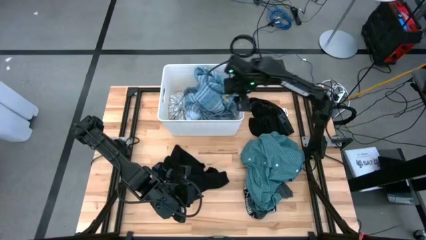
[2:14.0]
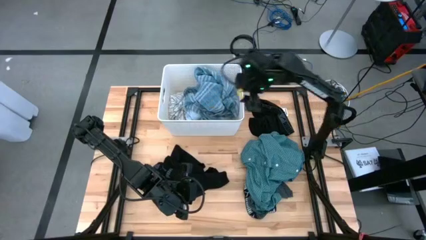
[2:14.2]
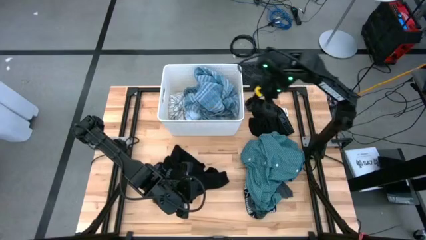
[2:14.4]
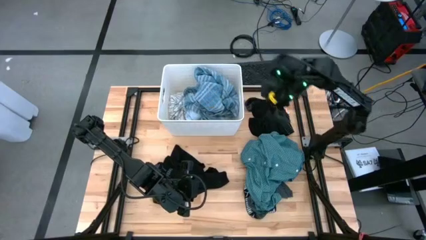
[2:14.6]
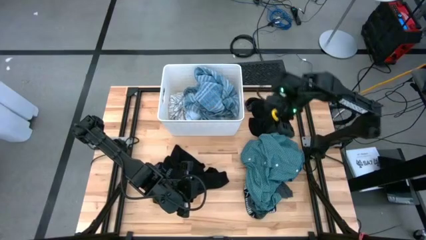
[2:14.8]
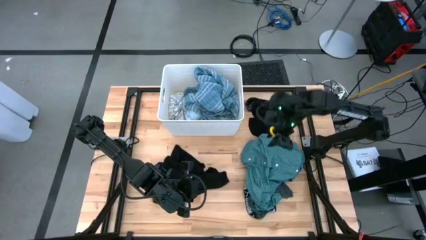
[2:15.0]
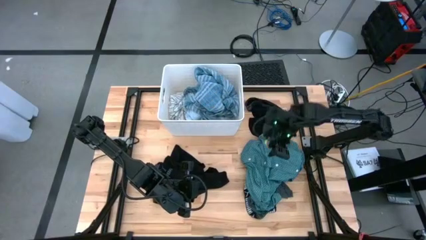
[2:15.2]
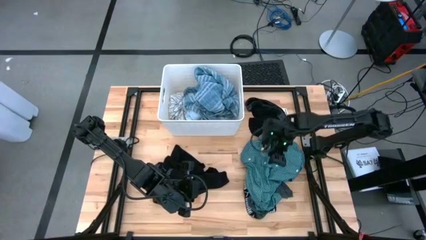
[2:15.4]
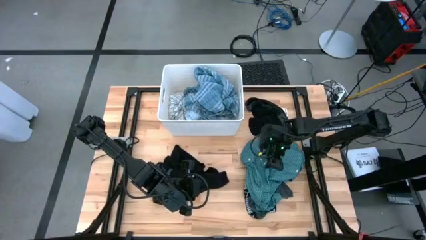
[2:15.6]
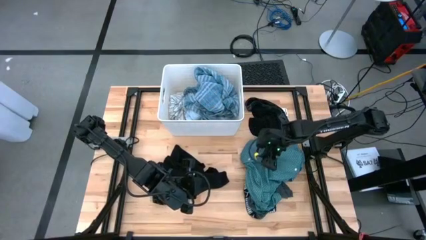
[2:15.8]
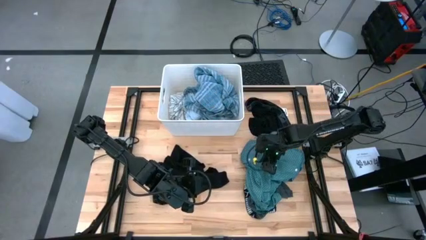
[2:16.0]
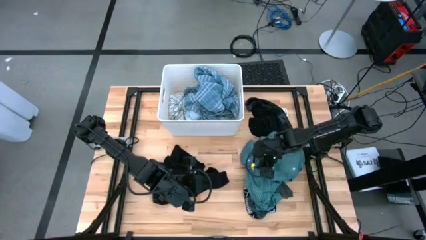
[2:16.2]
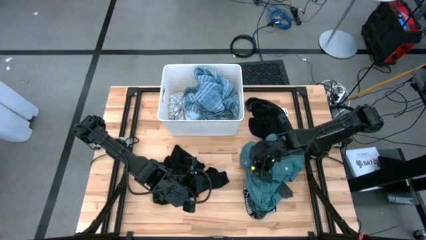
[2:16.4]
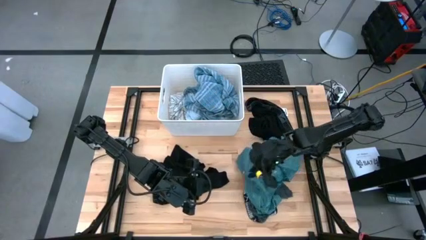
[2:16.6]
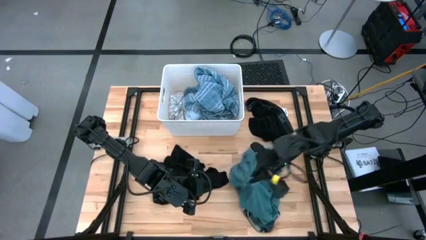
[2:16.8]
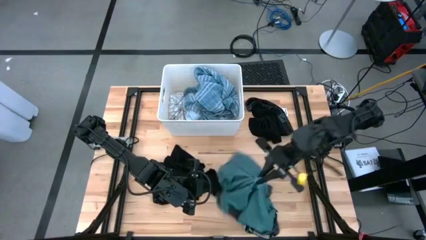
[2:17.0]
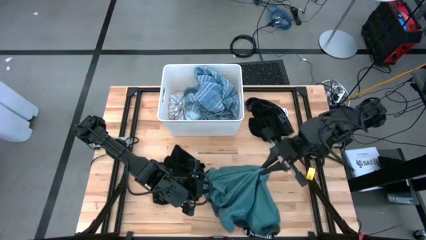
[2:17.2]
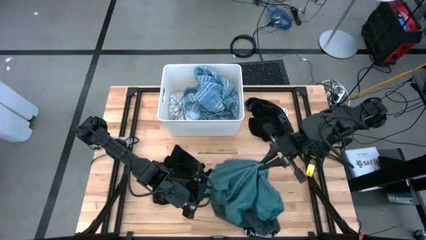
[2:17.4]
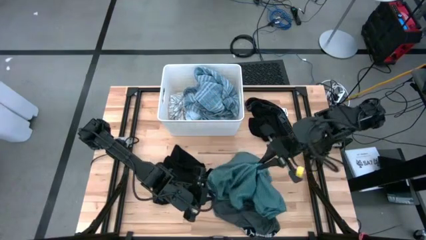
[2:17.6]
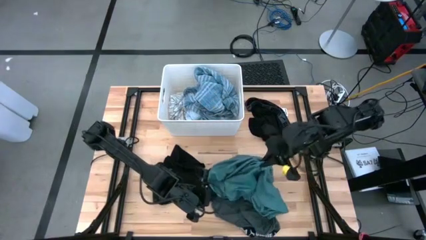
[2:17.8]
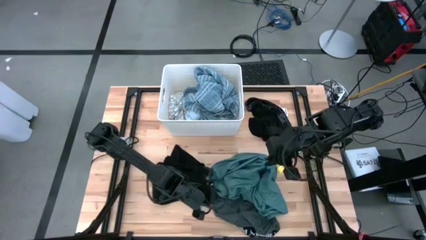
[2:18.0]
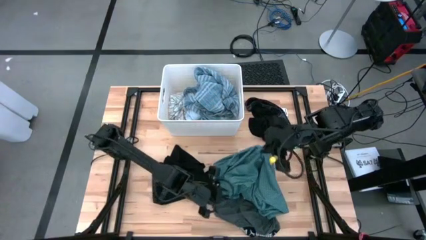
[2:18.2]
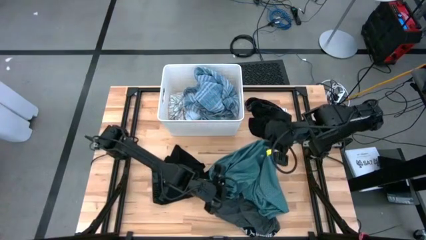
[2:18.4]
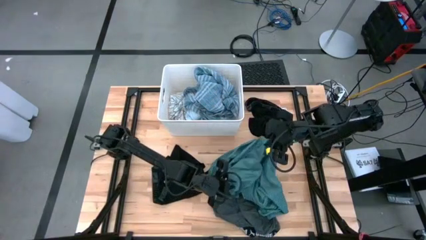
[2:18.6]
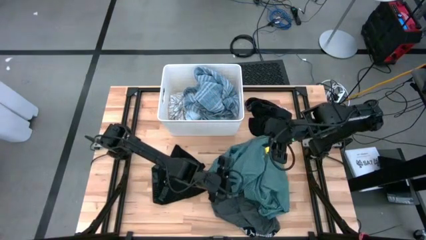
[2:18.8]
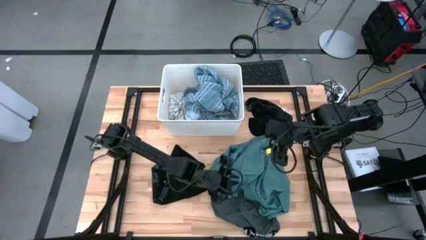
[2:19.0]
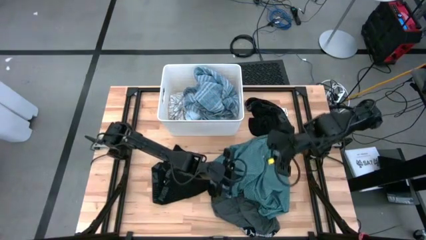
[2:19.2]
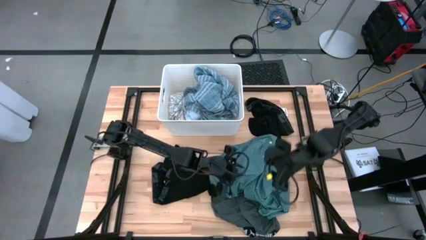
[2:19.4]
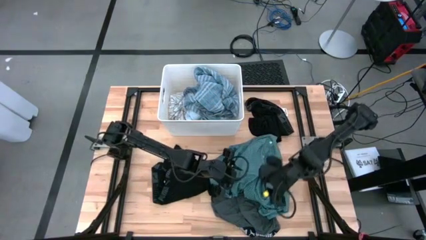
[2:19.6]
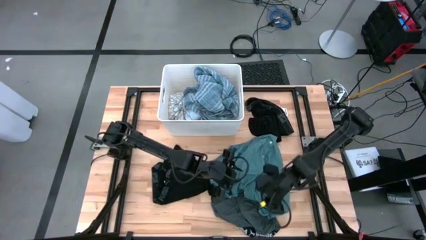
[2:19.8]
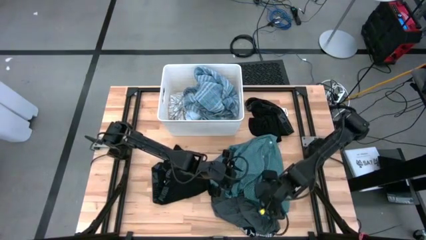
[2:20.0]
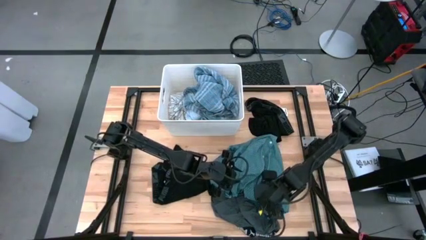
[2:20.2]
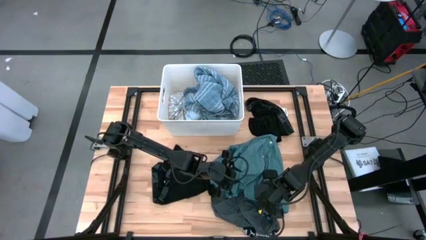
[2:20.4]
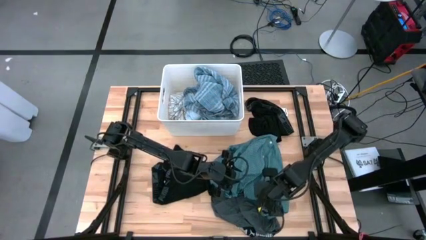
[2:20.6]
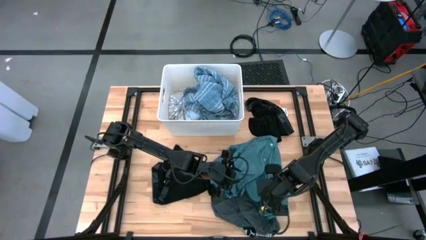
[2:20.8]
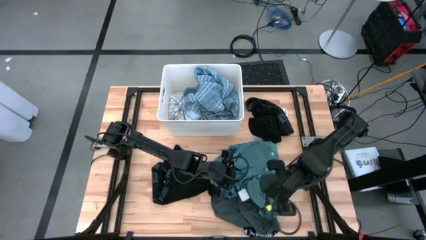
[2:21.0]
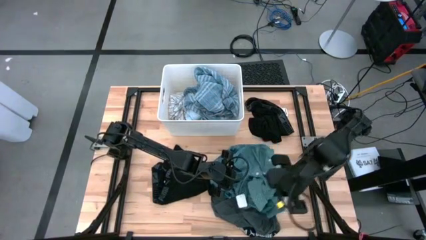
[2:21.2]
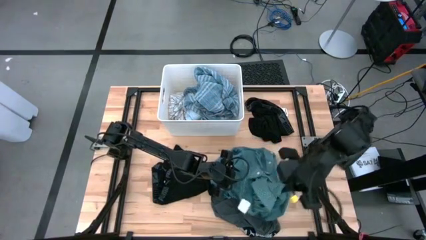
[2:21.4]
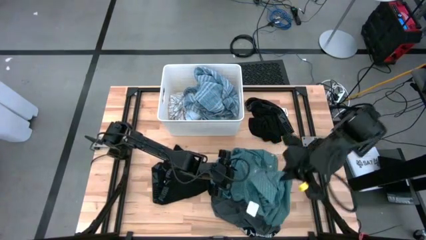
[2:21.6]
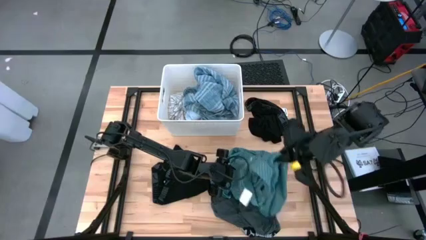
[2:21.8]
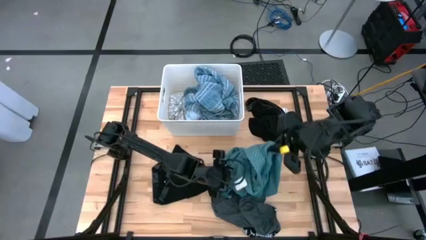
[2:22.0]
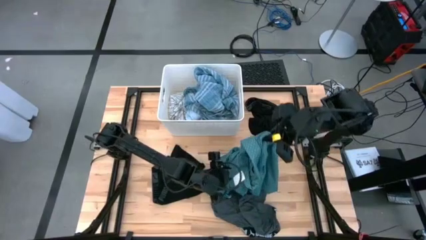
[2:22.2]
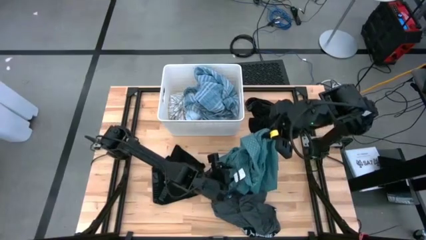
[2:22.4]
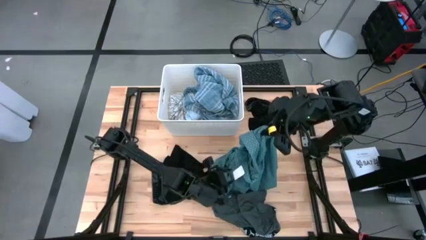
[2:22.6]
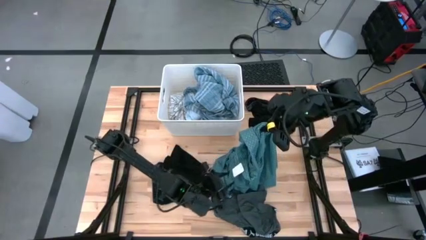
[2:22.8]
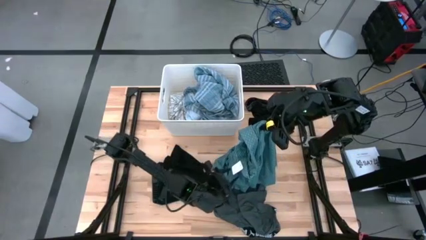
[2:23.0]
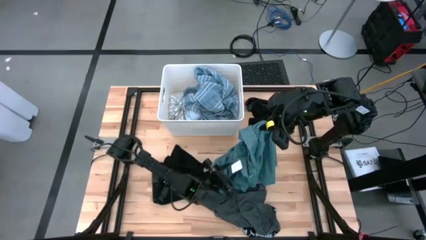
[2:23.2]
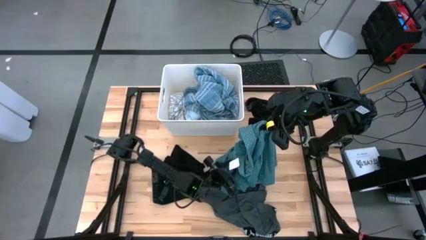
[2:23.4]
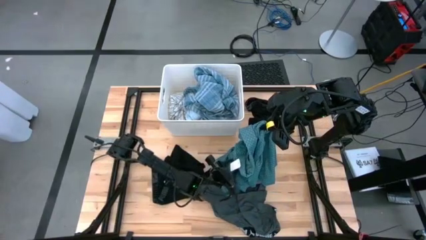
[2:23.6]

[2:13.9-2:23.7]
Task: Sort clothes
Put the green shirt into the white bin

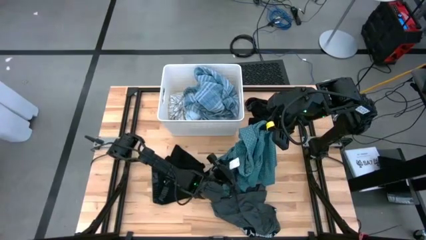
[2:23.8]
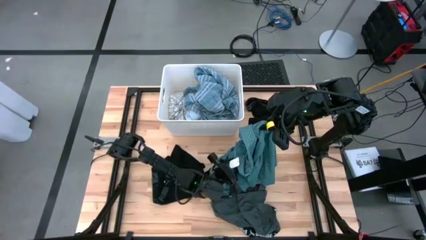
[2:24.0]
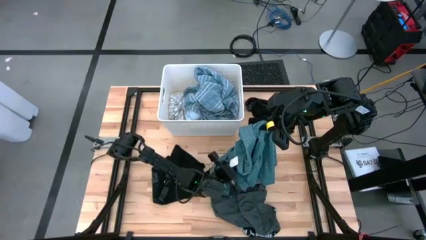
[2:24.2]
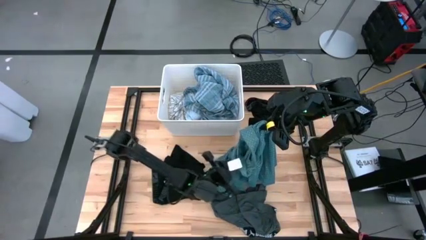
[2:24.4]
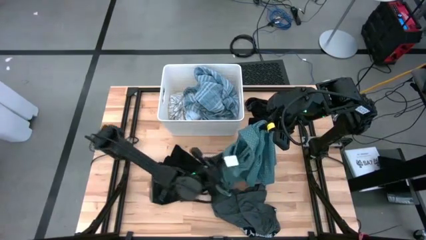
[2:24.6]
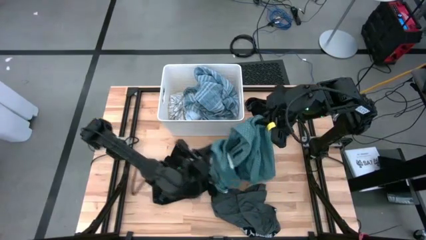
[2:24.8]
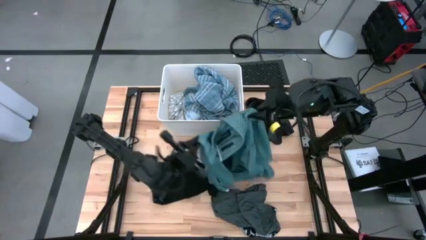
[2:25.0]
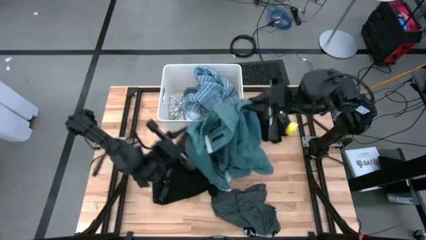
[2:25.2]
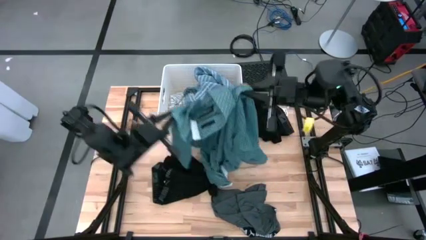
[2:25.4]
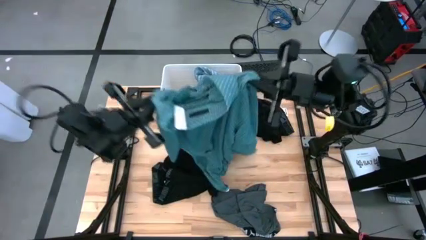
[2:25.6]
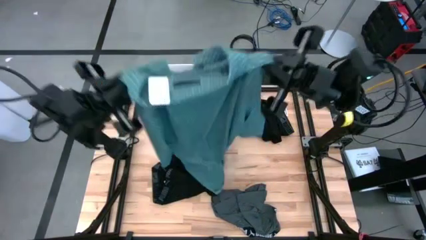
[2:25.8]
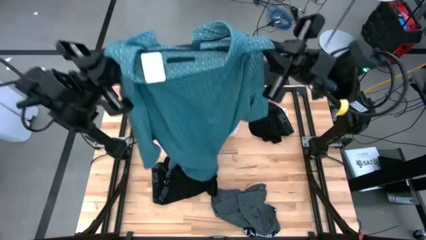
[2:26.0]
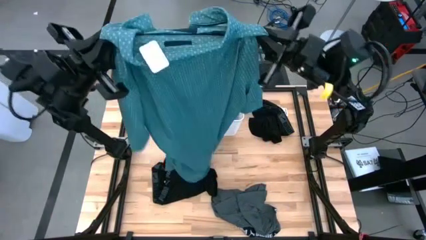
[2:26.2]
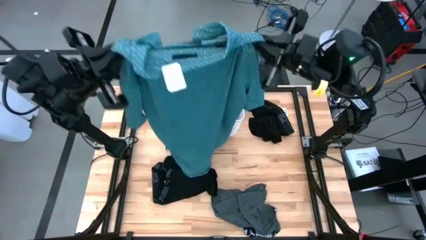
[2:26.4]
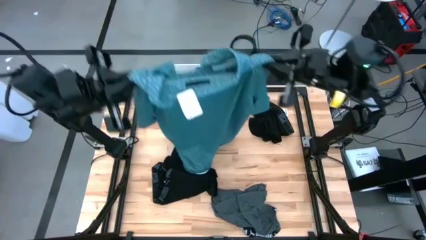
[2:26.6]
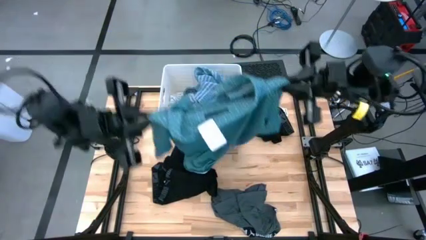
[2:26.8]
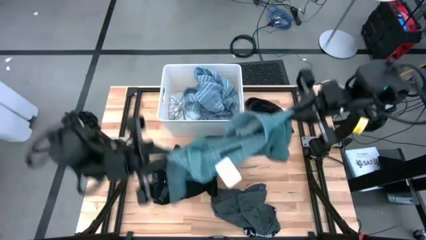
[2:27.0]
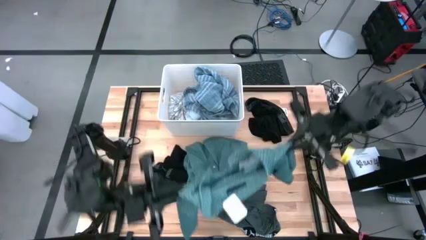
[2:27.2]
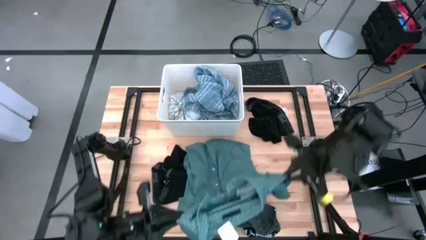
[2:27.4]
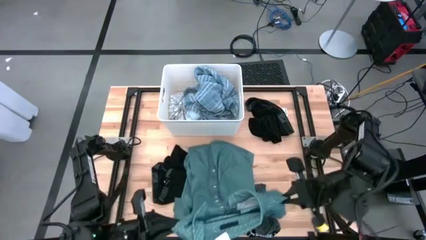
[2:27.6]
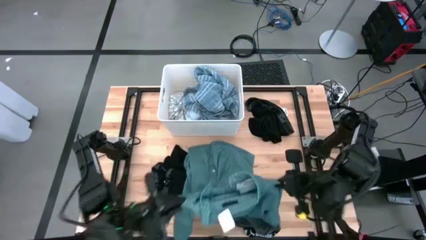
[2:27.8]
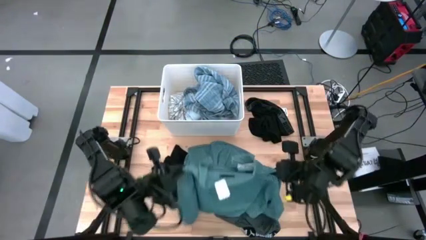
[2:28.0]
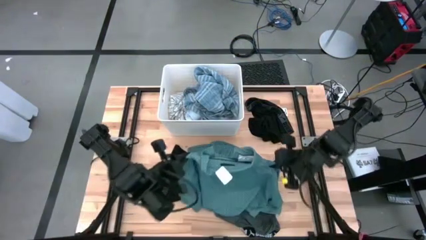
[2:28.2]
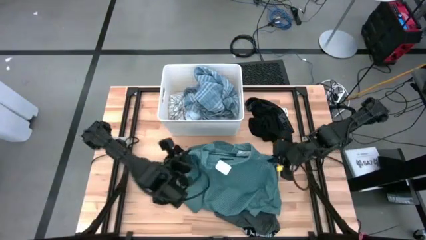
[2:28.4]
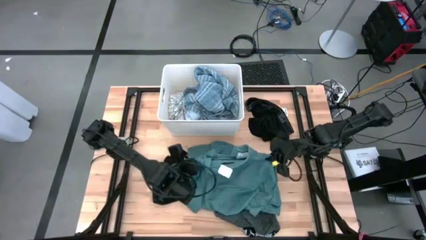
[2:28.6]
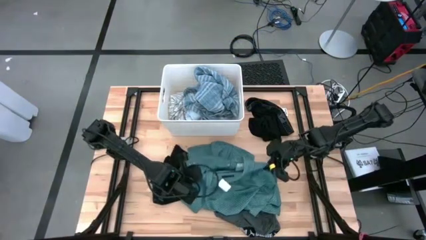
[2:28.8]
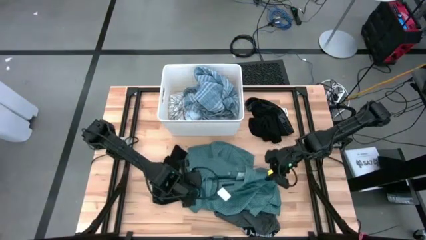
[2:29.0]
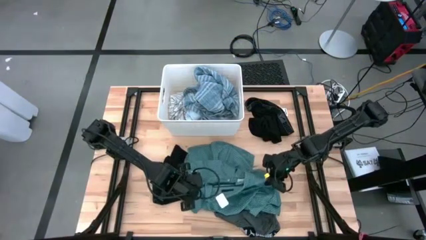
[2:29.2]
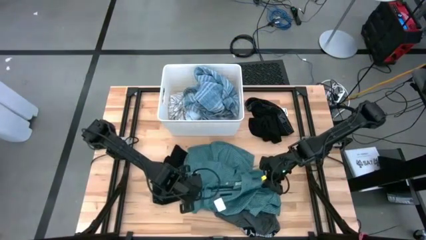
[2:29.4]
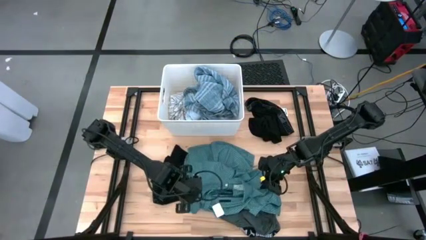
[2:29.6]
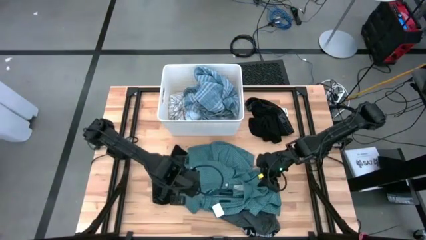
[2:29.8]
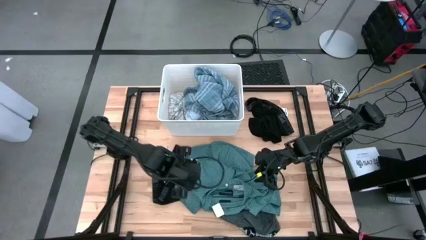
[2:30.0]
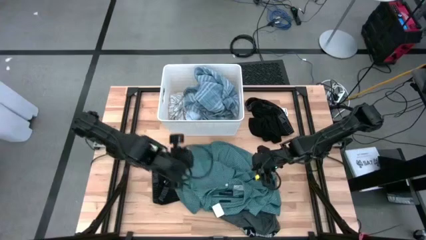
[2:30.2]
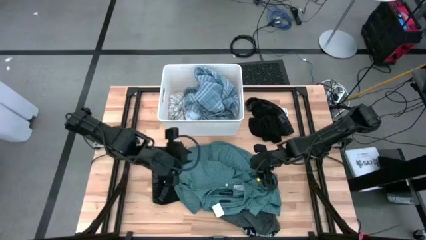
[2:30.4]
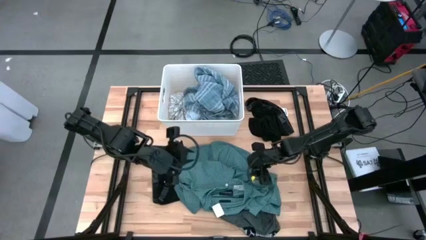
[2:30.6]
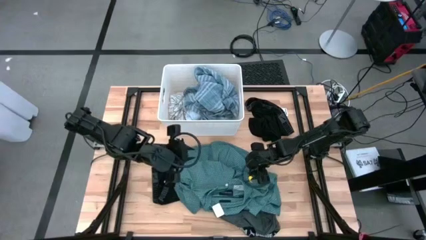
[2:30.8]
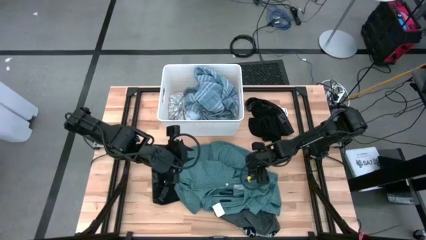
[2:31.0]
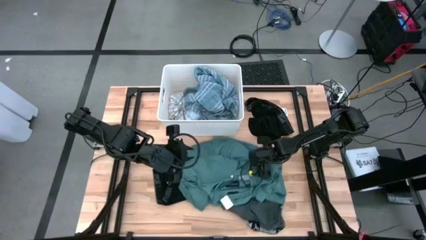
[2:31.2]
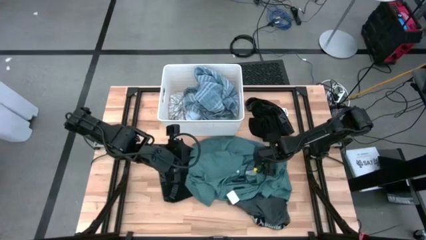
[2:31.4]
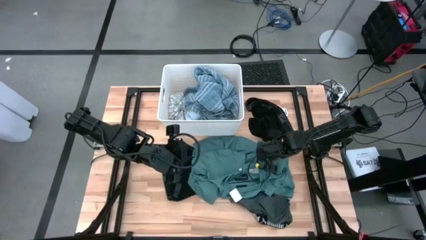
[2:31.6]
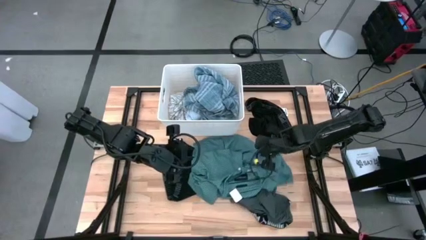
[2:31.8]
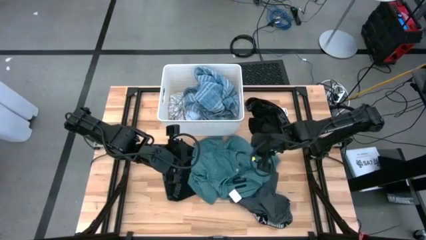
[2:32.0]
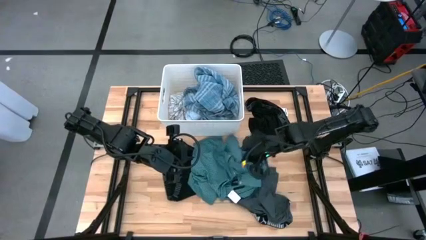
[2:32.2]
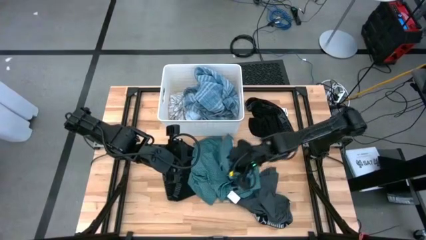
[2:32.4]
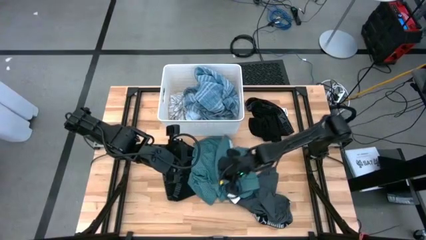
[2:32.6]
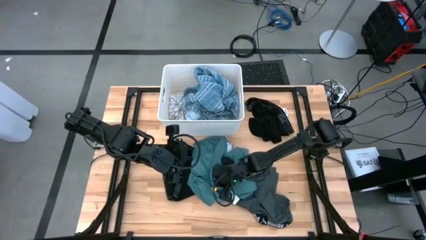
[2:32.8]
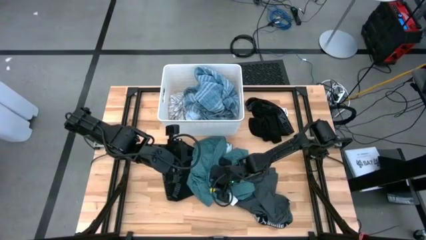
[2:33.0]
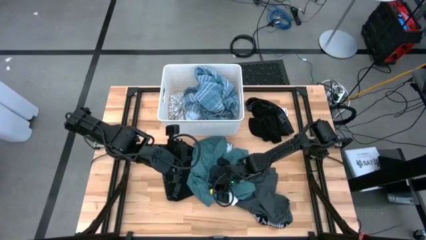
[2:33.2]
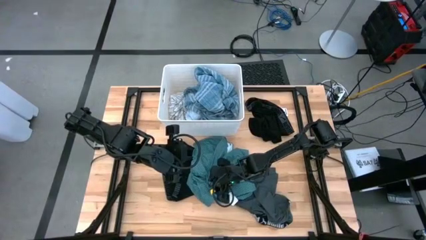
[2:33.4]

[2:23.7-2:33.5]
Put the green shirt into the white bin
